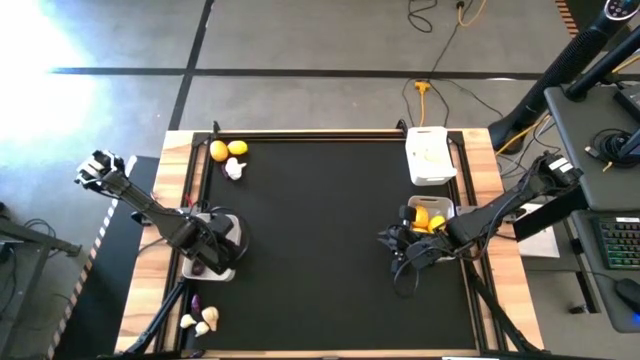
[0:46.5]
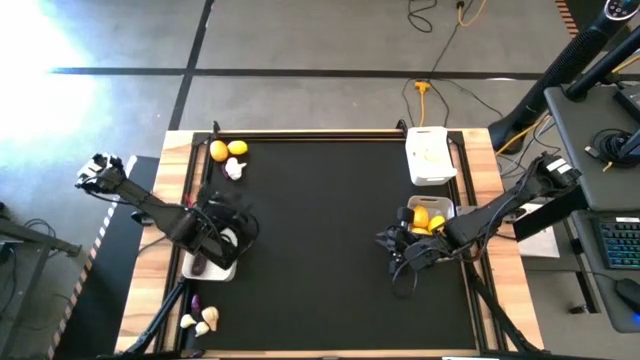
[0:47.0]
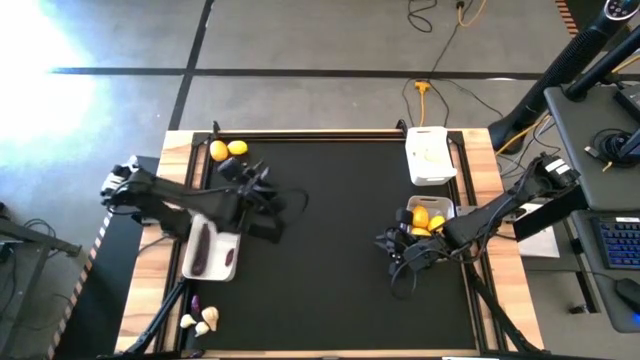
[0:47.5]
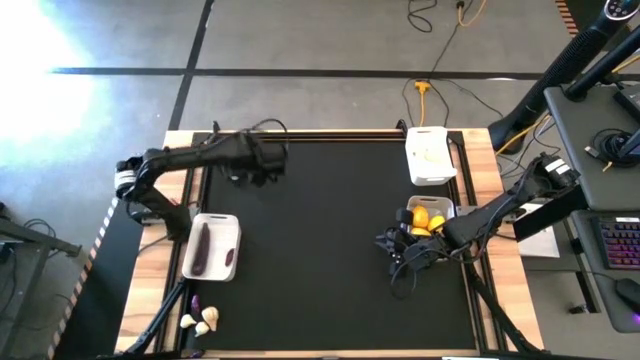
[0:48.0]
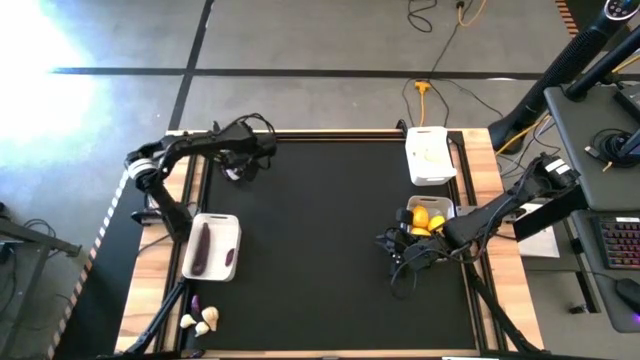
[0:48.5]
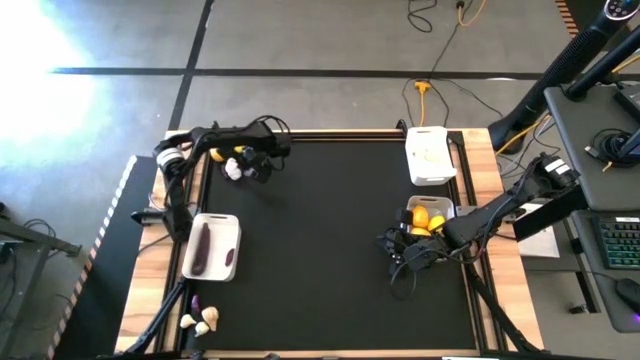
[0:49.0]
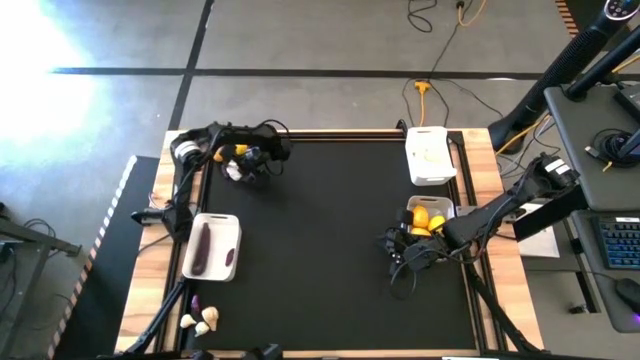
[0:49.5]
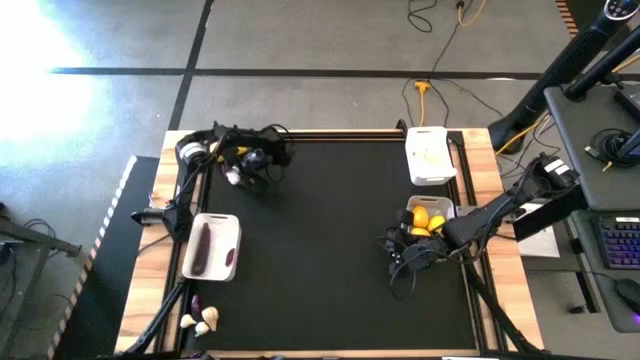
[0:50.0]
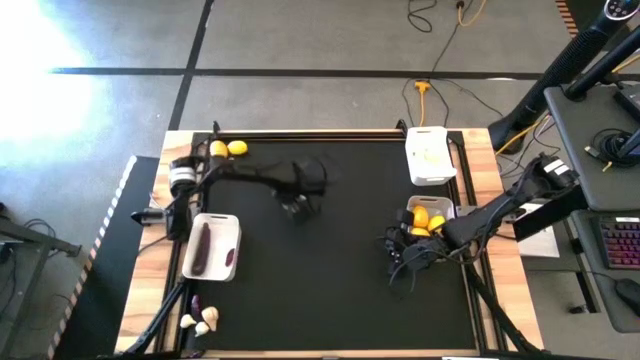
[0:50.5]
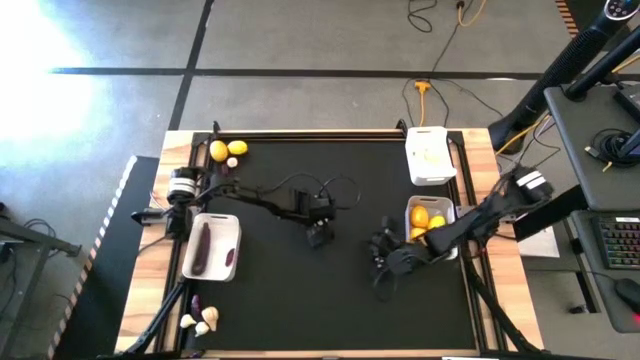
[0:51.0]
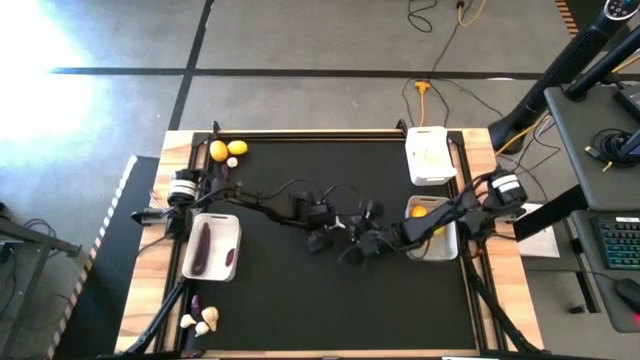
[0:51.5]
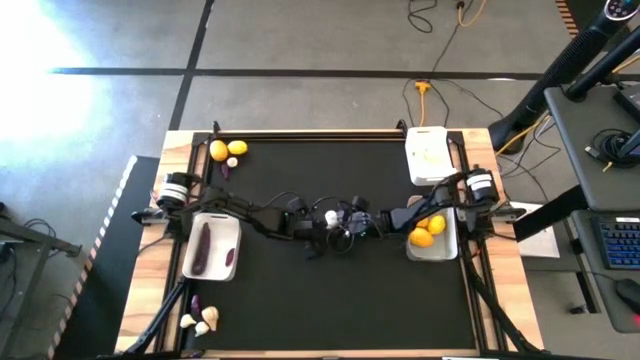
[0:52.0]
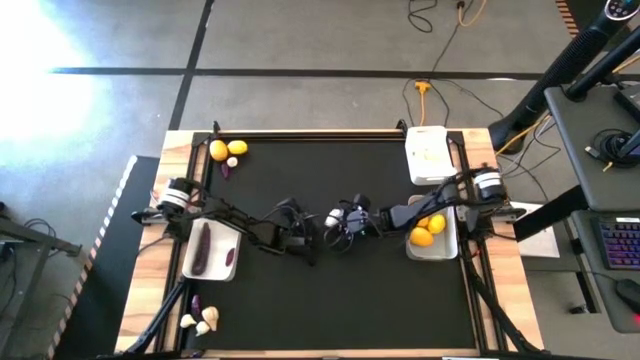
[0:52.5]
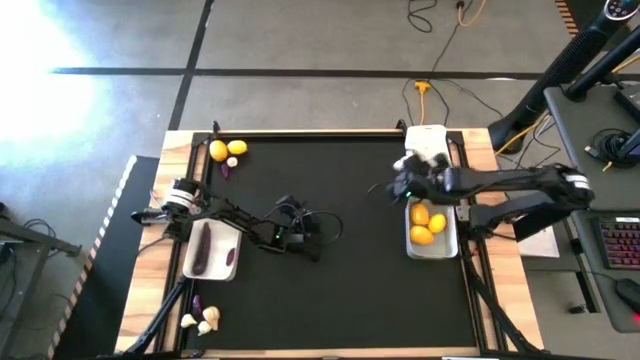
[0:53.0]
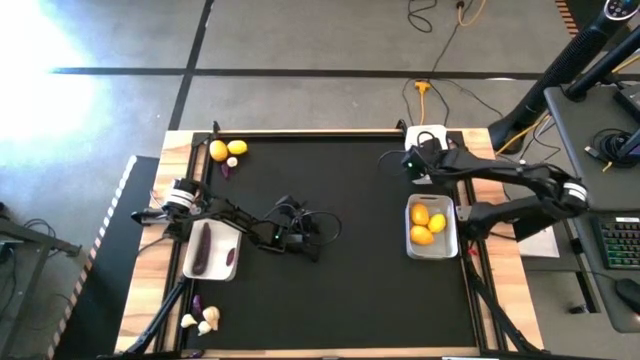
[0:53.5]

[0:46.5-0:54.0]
Task: Sort produce into baskets
Put the garlic into the top white bin

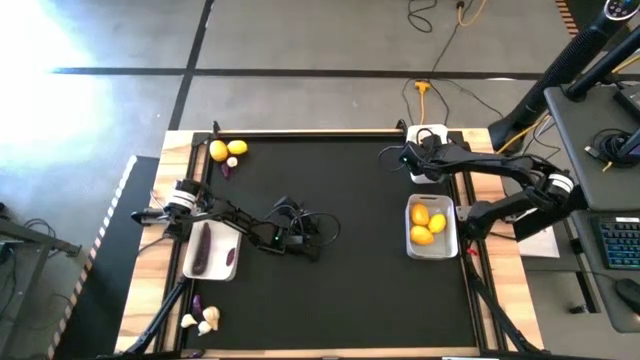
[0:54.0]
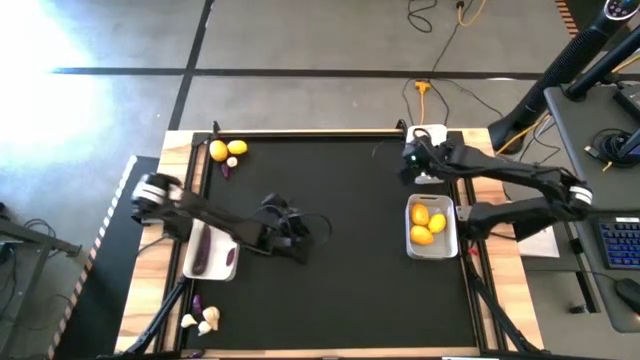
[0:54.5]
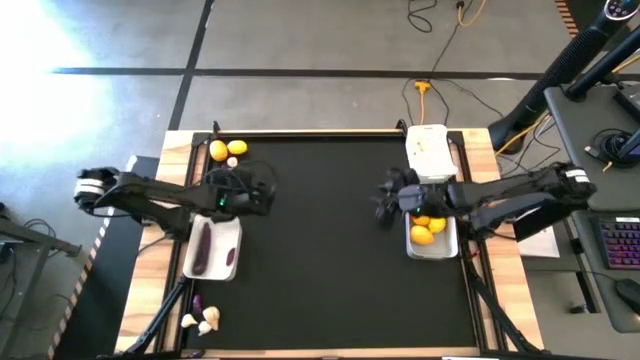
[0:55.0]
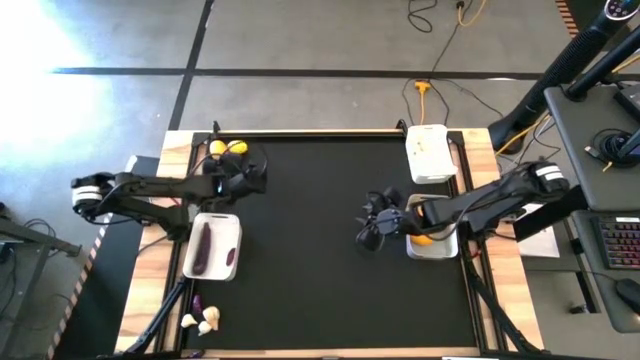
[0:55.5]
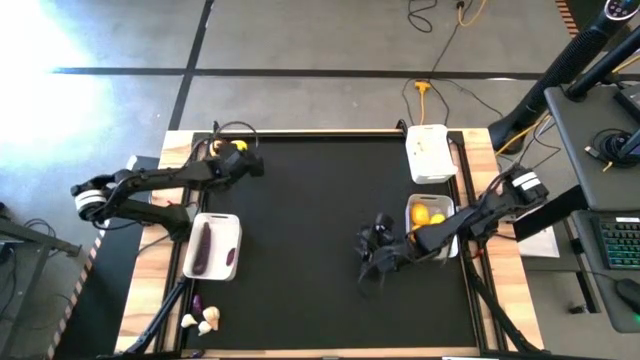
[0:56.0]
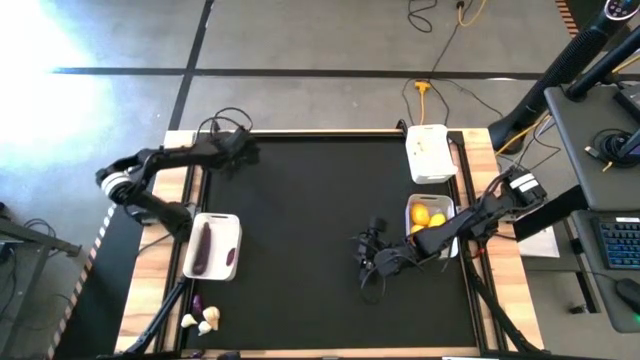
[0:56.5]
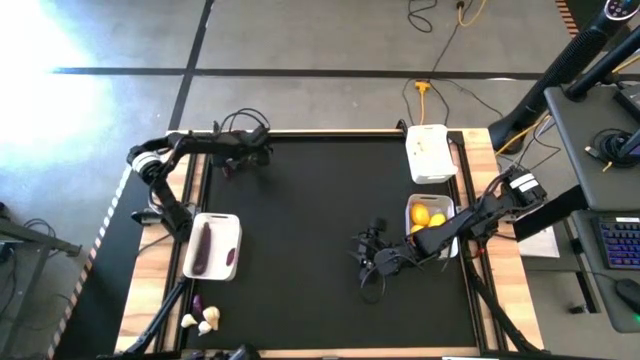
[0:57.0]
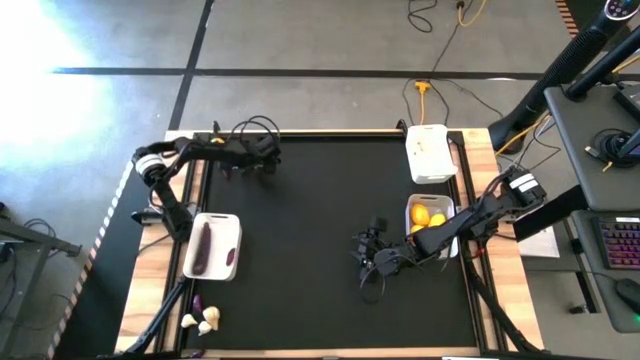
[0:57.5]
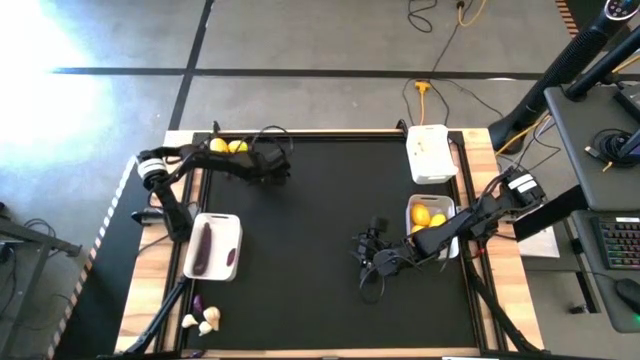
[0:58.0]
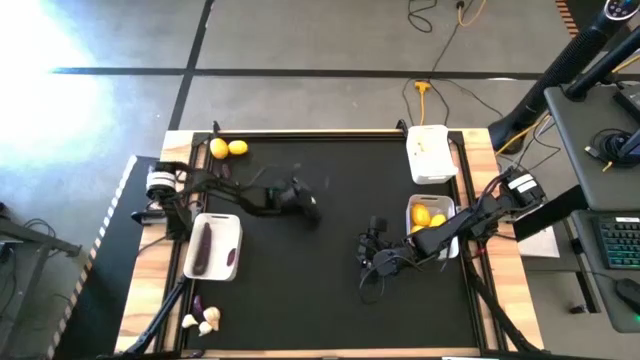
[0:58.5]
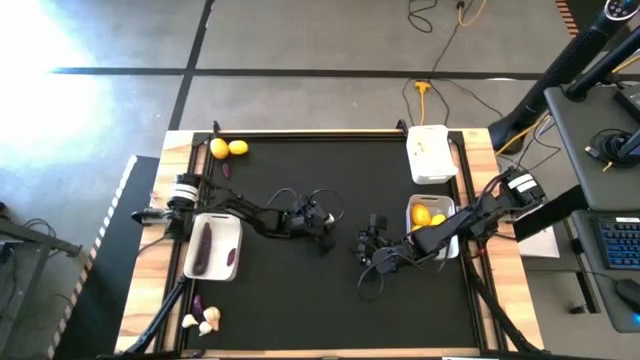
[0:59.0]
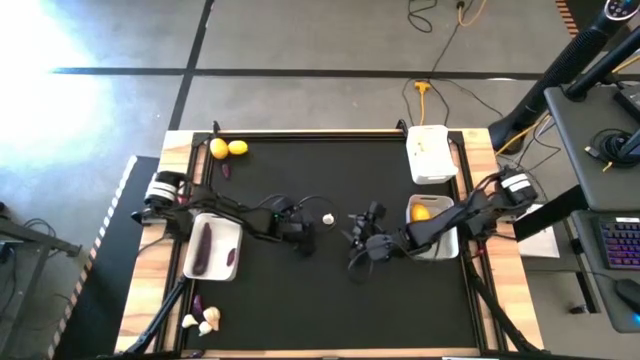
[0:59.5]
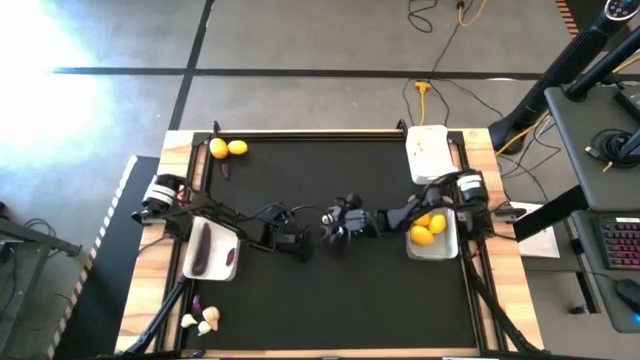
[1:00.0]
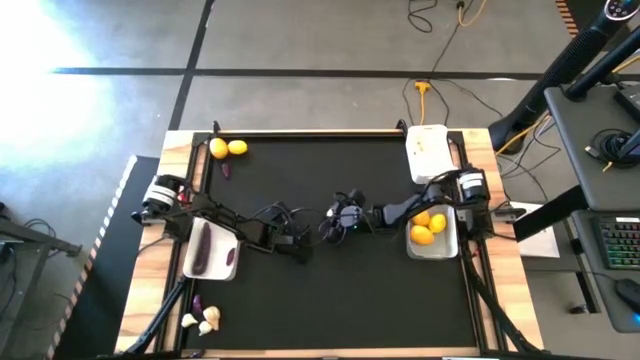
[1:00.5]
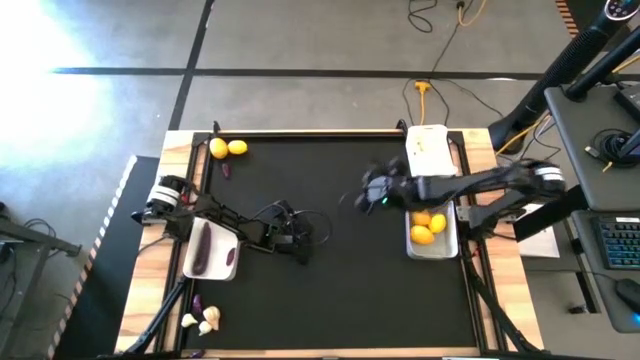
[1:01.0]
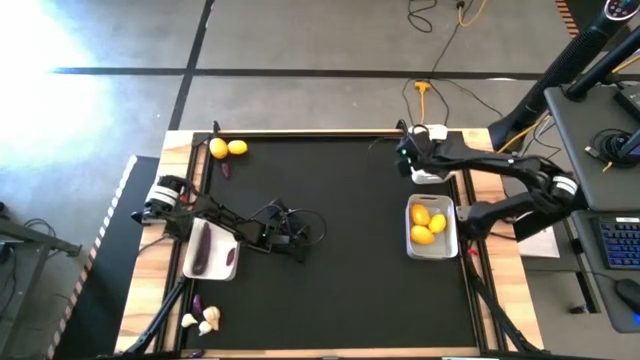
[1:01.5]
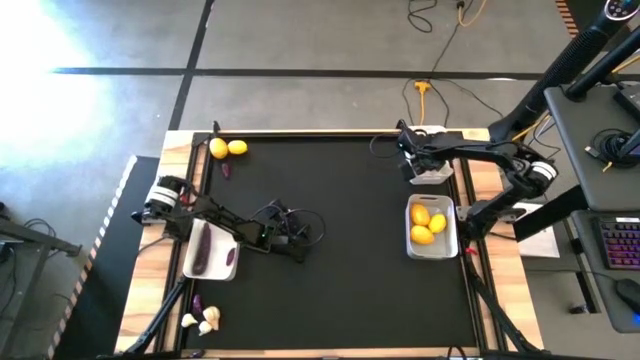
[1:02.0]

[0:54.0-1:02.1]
Put the garlic into the top white bin

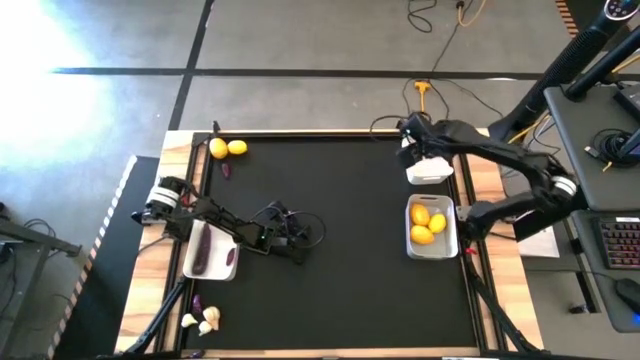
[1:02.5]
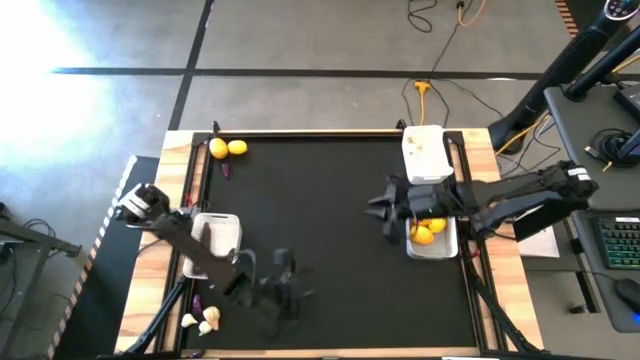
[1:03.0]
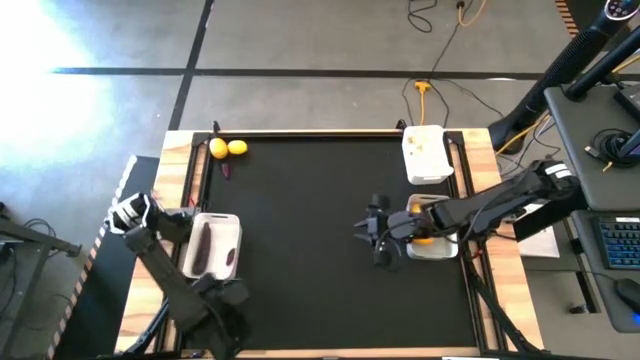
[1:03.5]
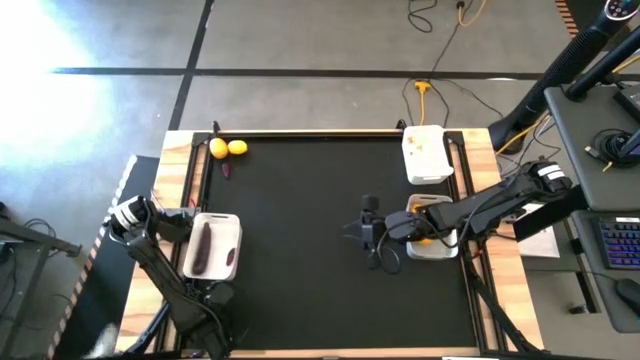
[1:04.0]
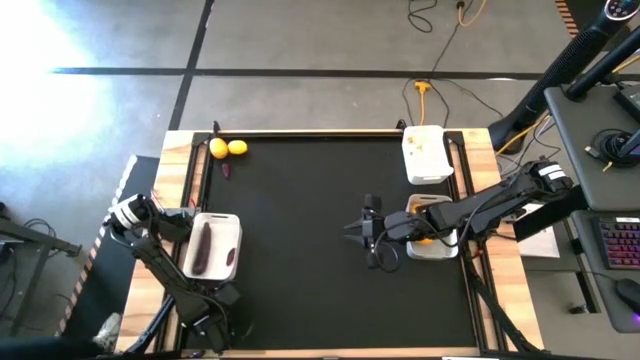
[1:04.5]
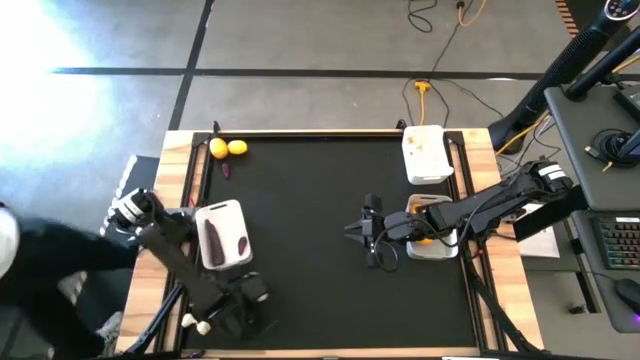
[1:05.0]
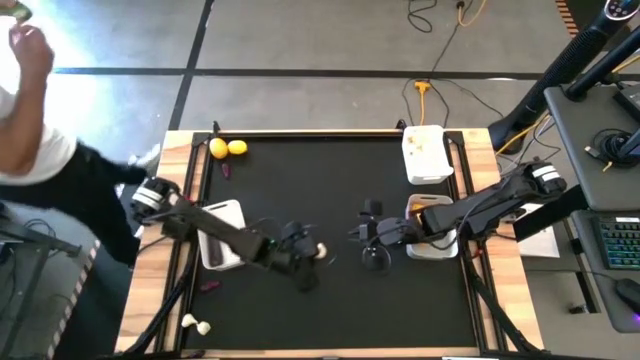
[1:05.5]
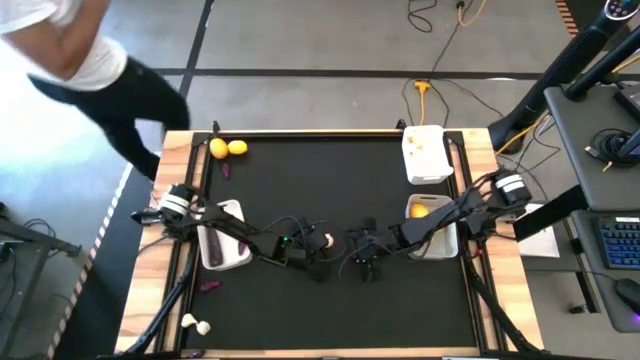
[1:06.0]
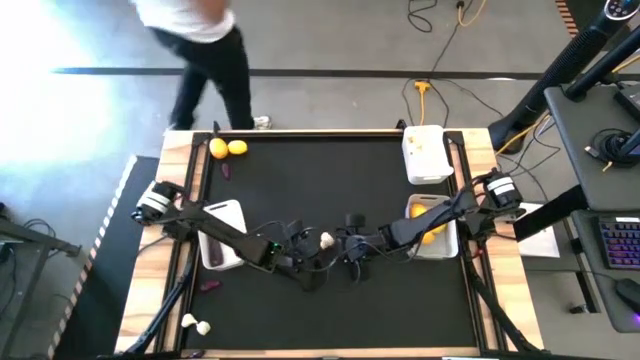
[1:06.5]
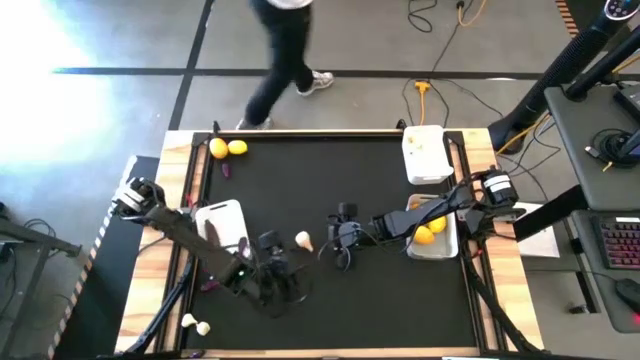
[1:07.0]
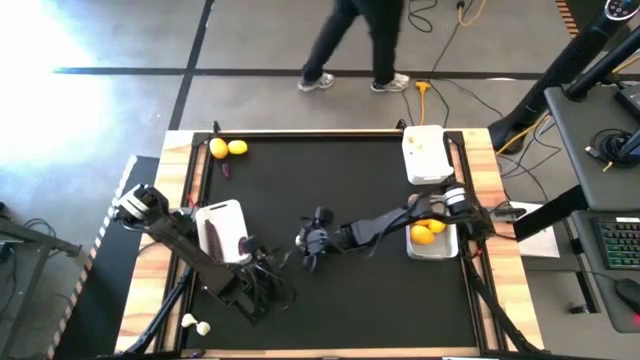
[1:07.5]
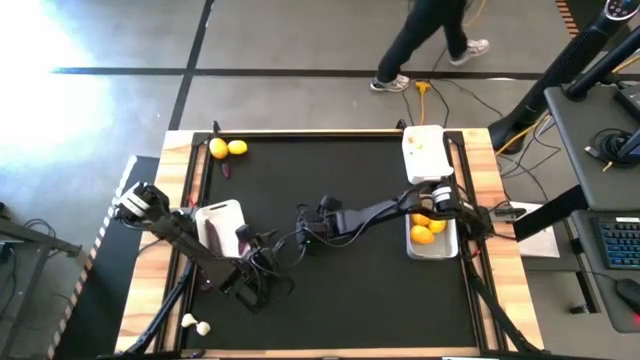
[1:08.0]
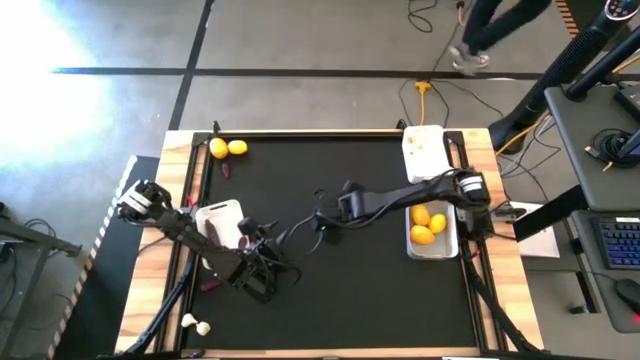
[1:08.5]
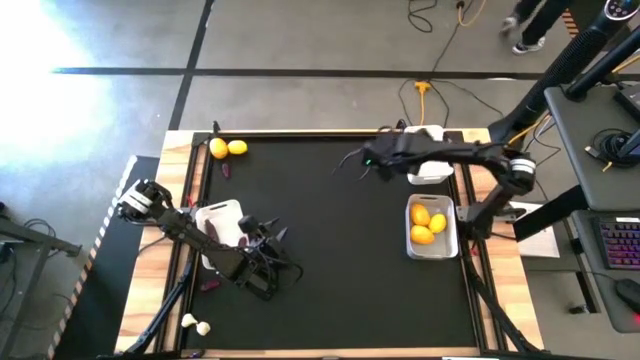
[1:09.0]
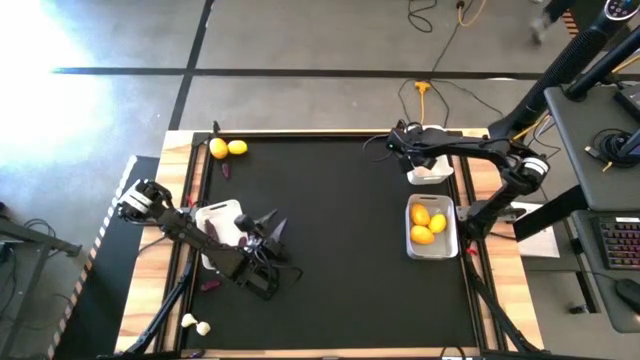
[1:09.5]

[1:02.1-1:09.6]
Put the garlic into the top white bin
